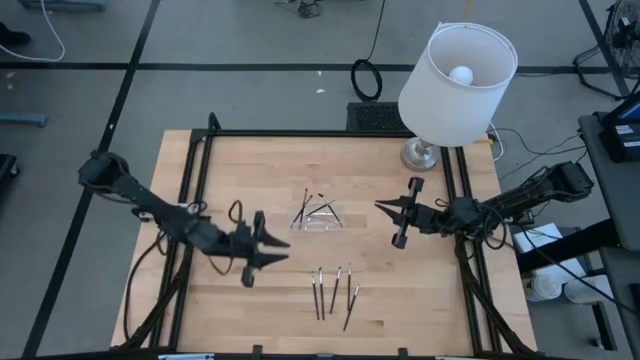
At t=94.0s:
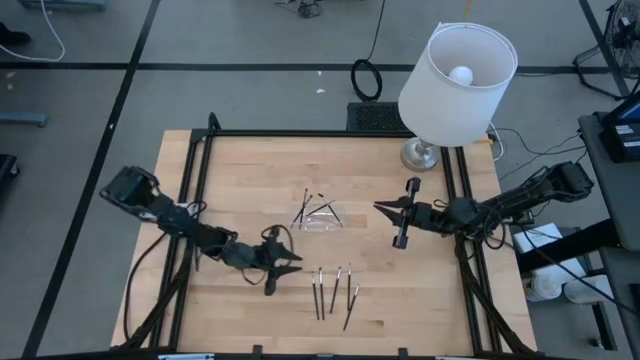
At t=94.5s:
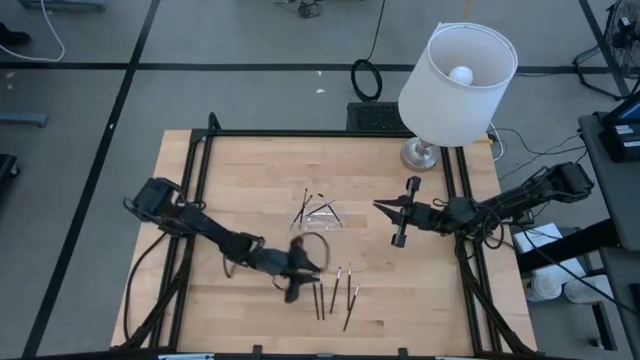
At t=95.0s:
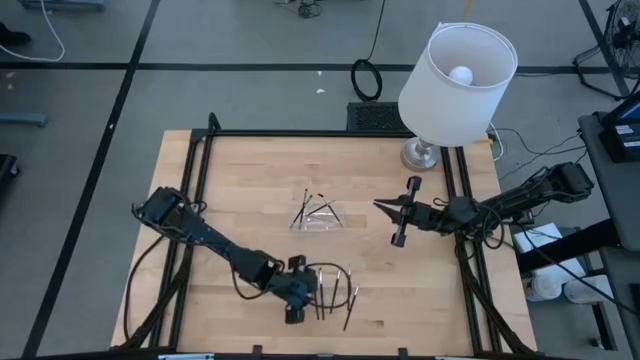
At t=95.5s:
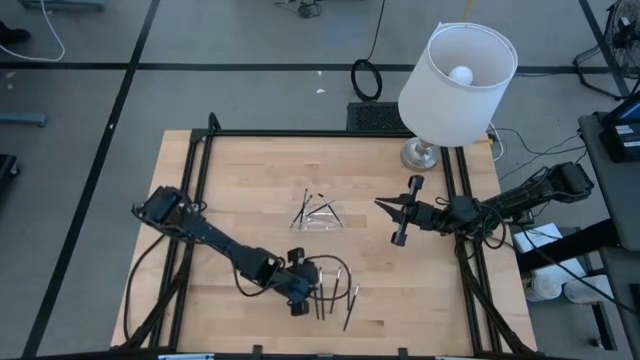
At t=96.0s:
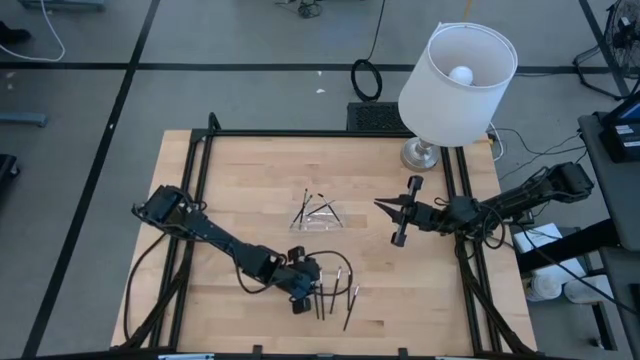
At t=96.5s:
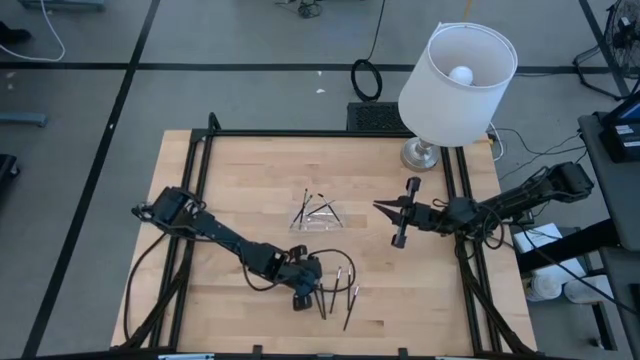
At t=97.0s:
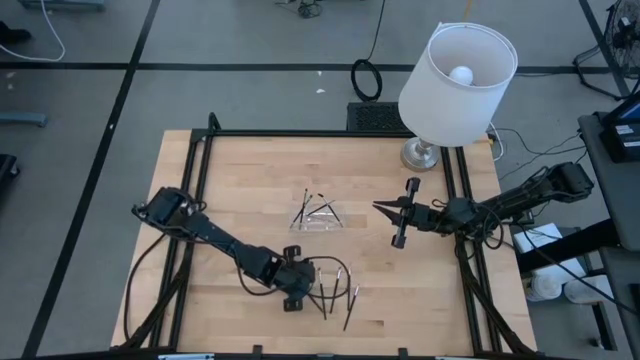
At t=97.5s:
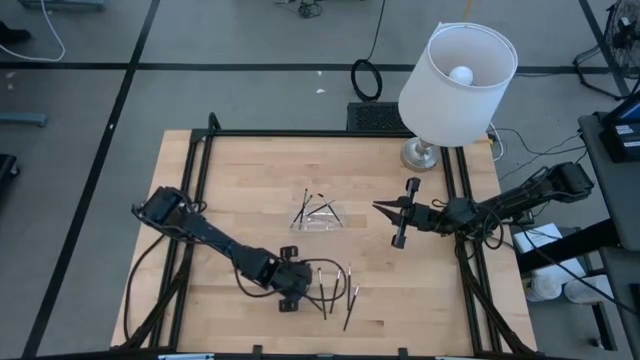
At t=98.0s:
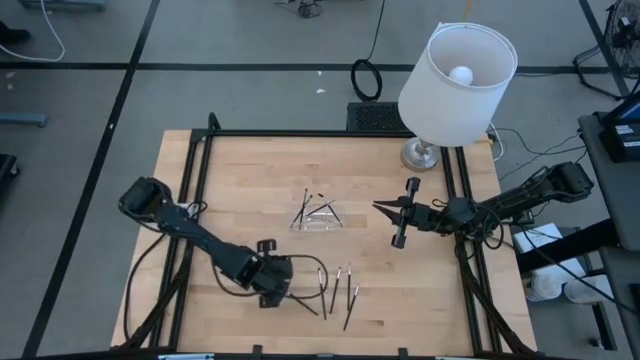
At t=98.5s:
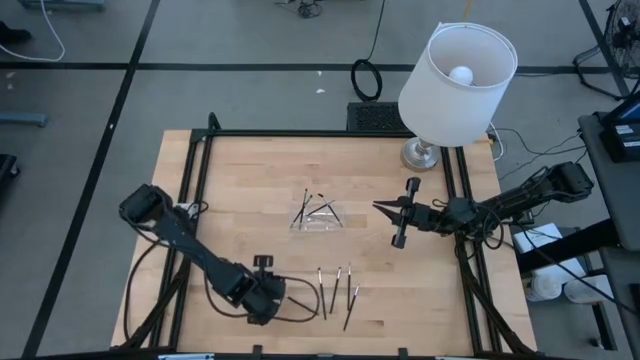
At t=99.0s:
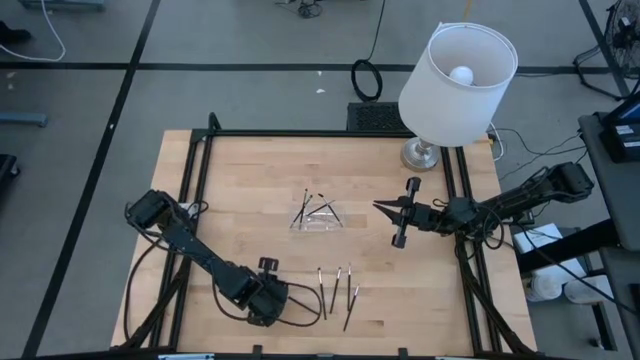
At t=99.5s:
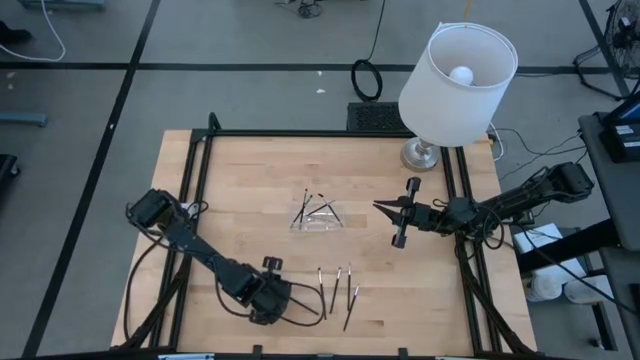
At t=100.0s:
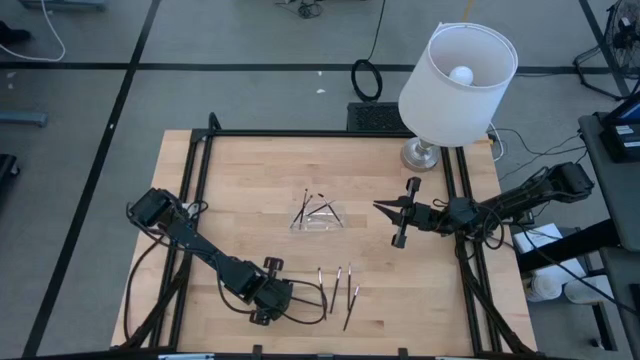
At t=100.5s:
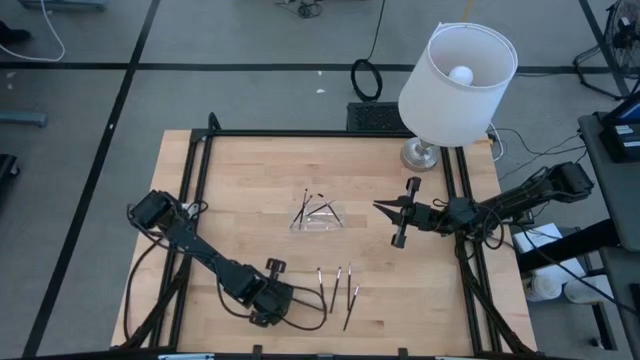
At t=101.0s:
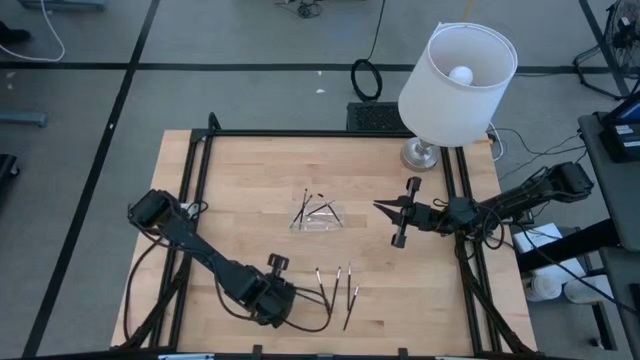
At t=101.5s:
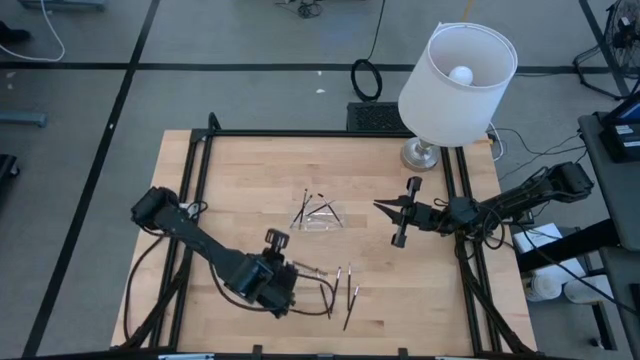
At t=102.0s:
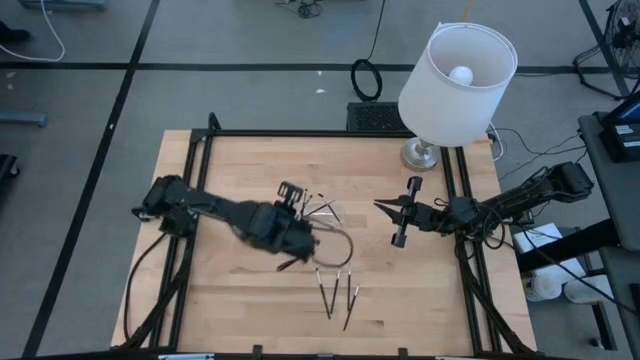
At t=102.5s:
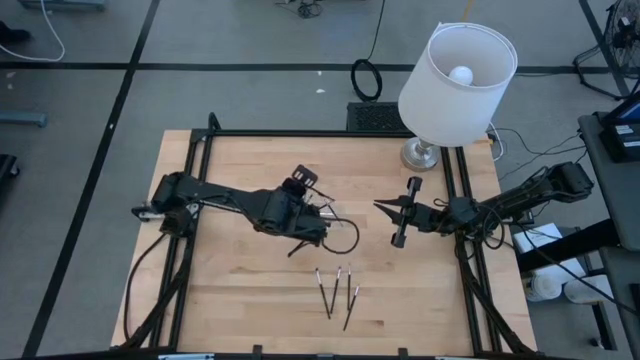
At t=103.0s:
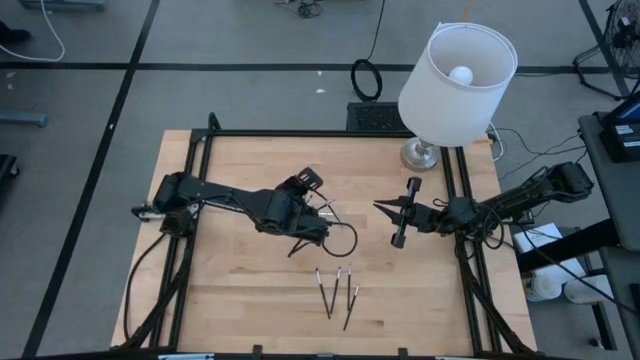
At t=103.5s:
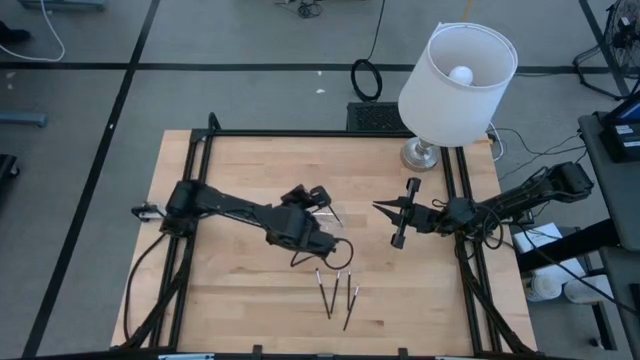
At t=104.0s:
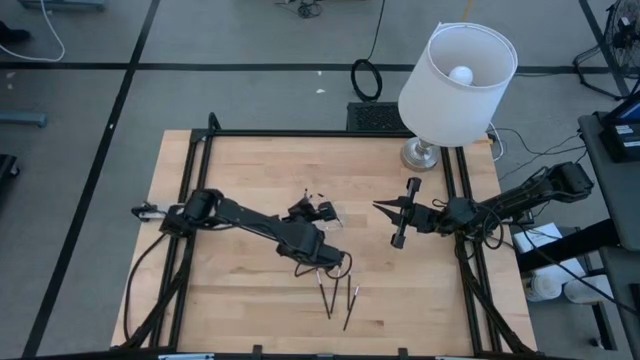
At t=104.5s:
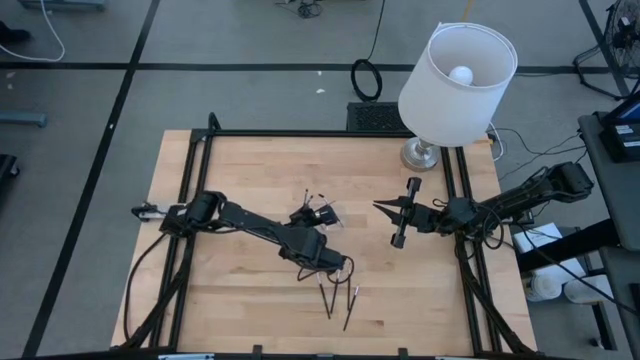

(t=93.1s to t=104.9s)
Task: Pick & Place Makeup Supplies
Put the makeup brush into the transparent organizer

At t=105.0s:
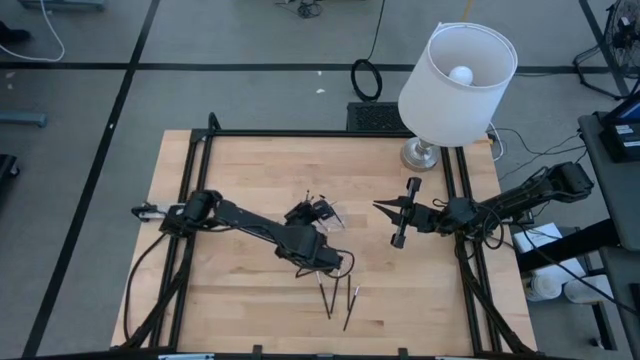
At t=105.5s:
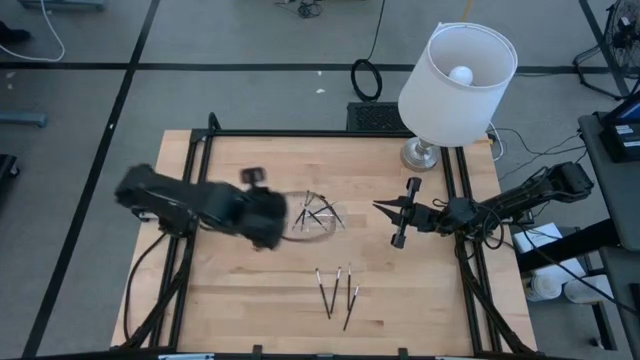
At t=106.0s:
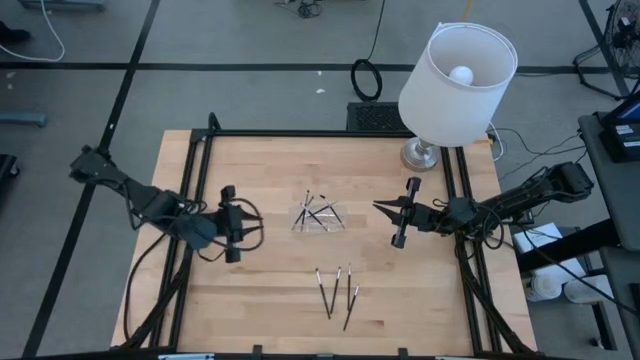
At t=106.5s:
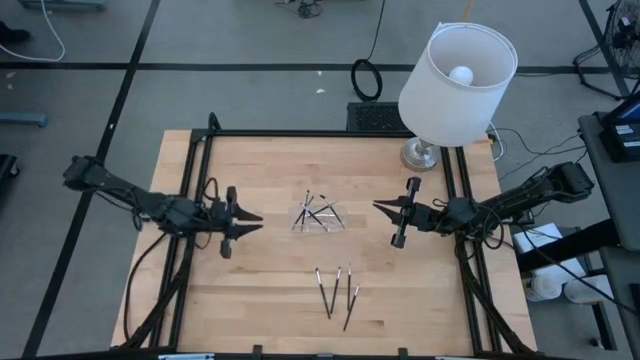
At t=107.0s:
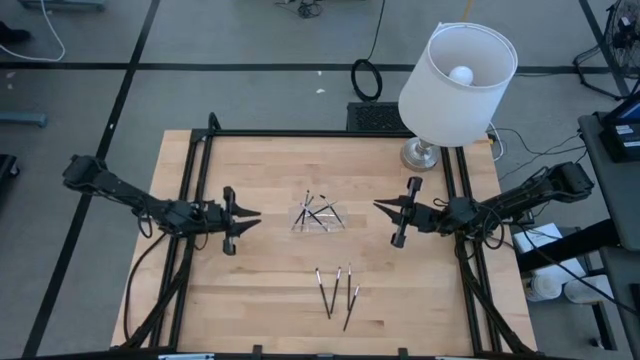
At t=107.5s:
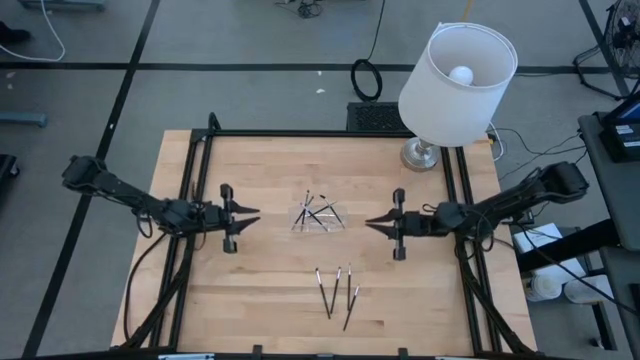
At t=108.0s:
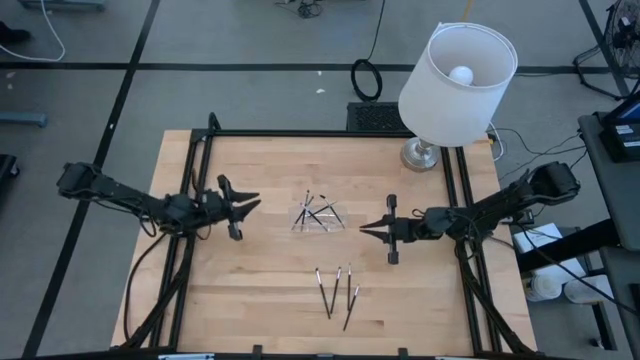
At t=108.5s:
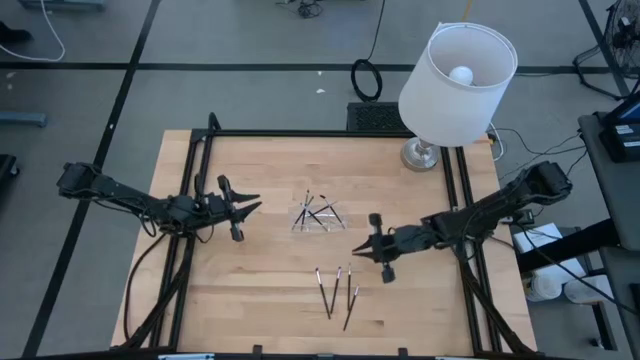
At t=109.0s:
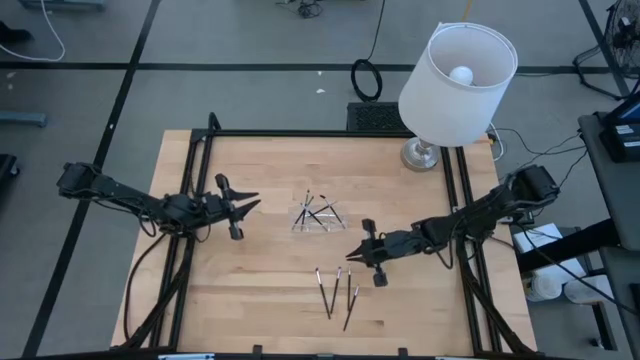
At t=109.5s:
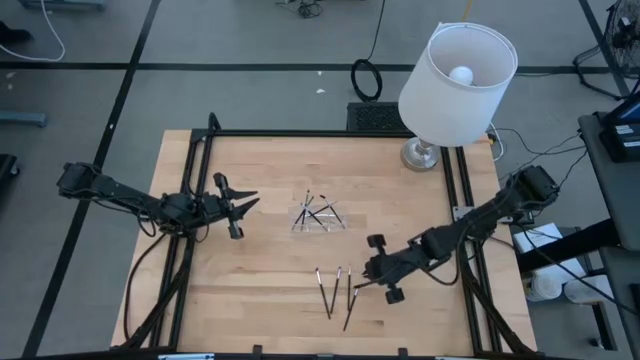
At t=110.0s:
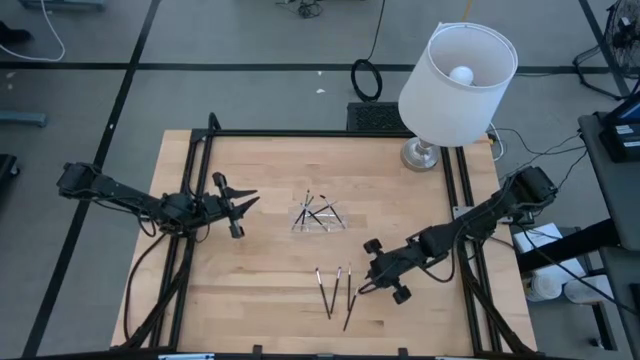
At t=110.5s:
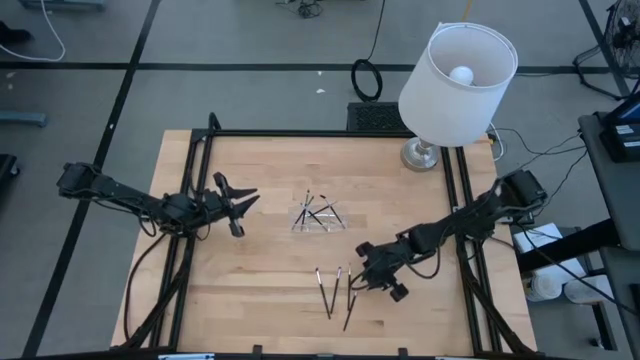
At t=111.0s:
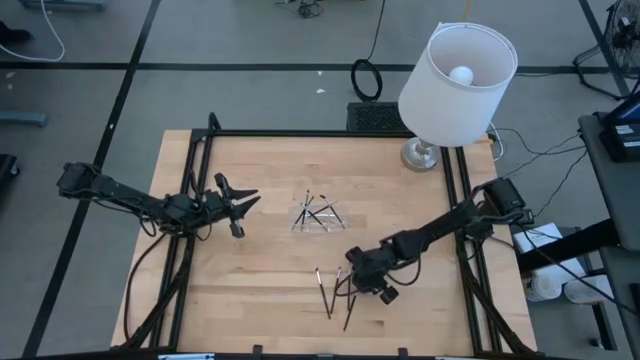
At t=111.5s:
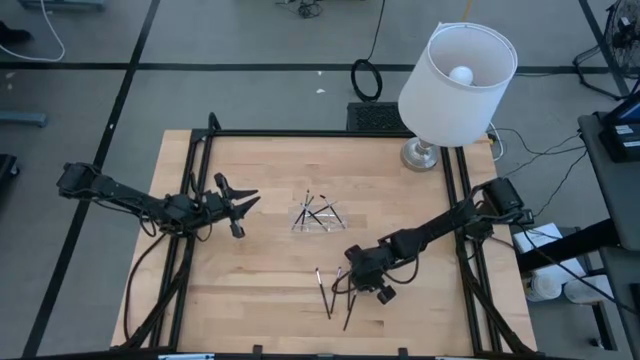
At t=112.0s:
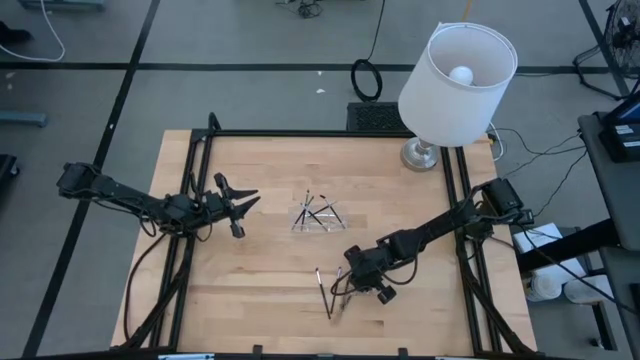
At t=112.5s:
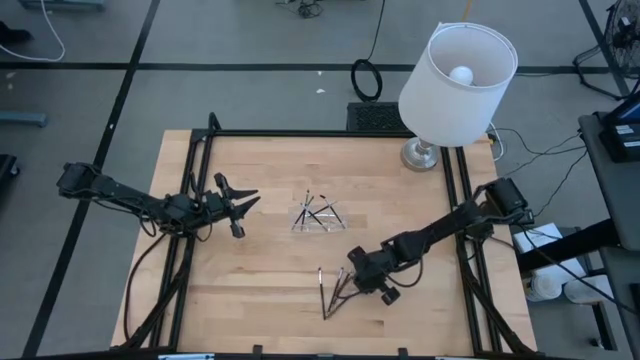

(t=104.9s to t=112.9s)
Put the makeup brush into the transparent organizer

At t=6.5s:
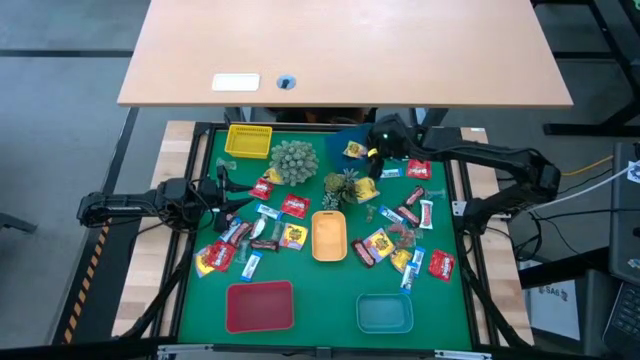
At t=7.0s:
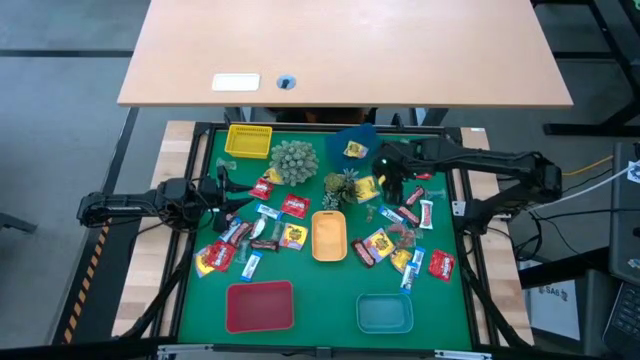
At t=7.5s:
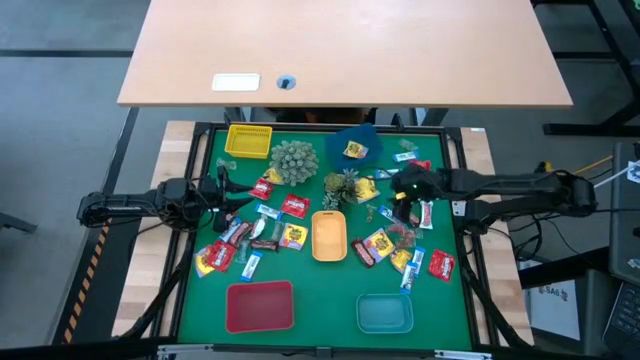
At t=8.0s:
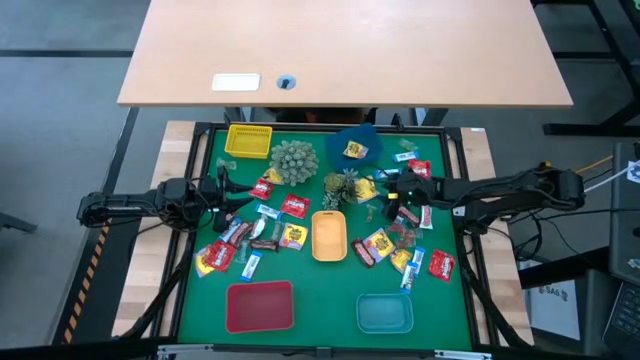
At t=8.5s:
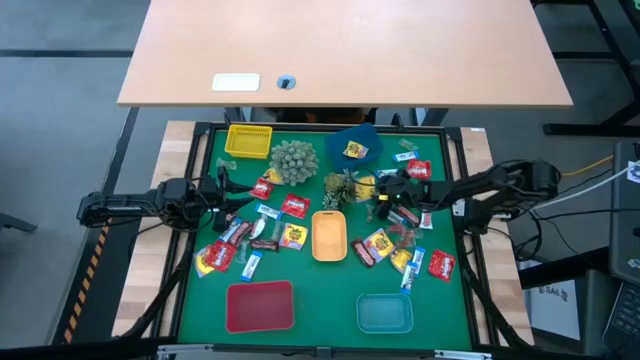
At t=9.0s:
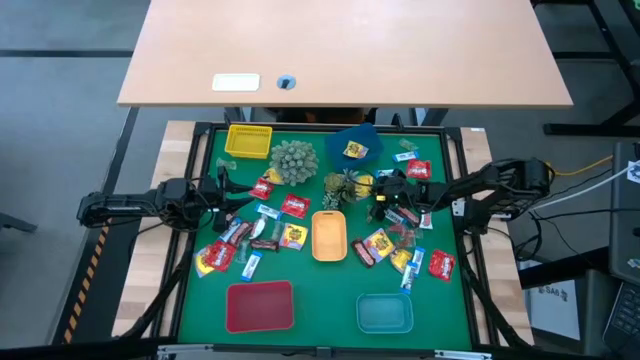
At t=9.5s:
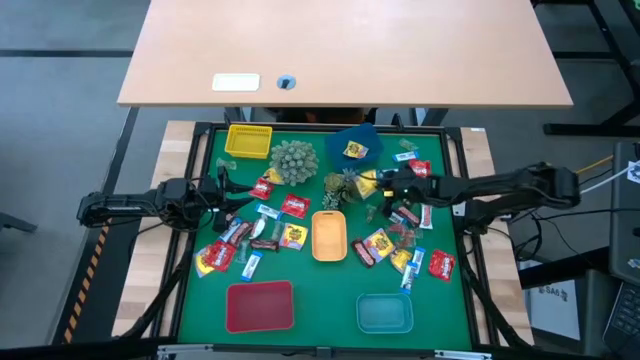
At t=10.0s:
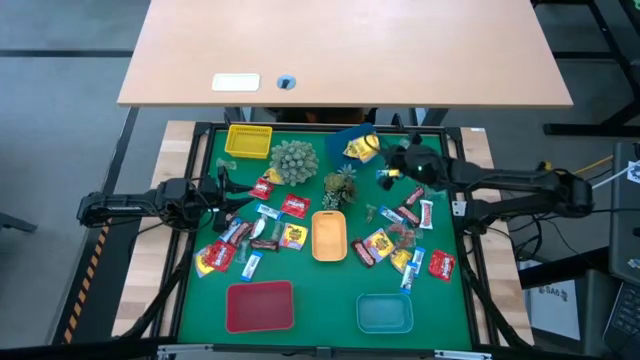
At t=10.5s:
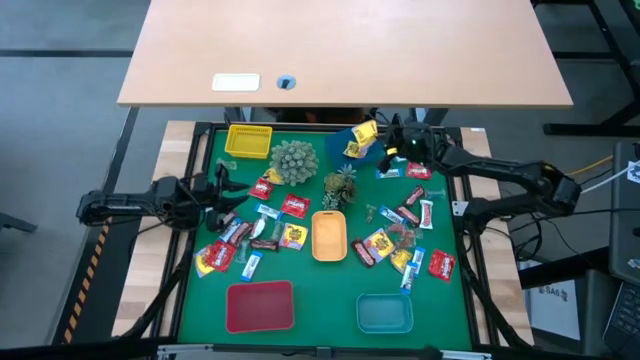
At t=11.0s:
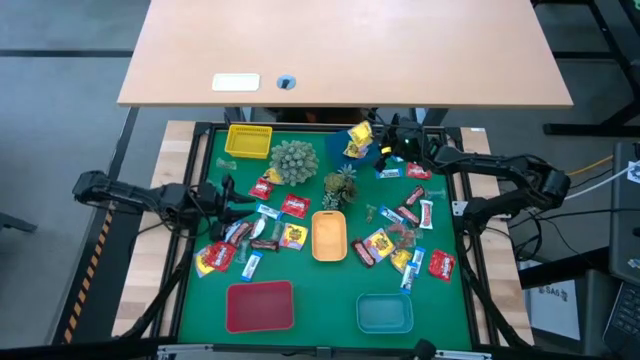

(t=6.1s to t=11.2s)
Task: Sort candy
Put the yellow candy into the blue bin
